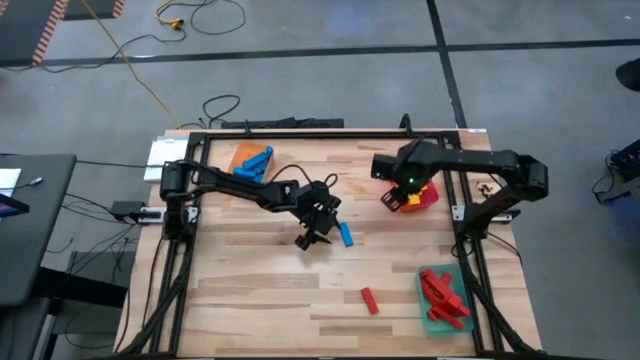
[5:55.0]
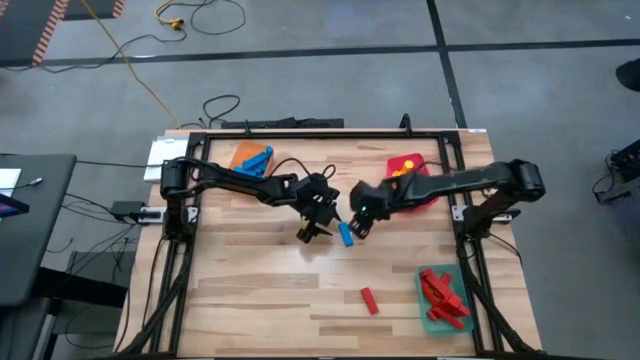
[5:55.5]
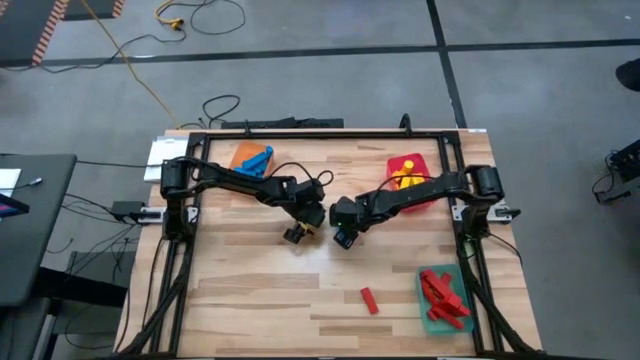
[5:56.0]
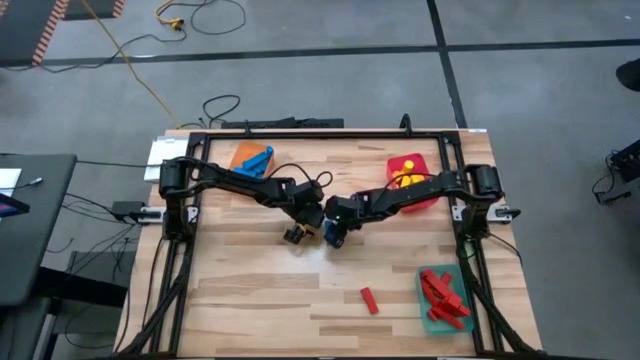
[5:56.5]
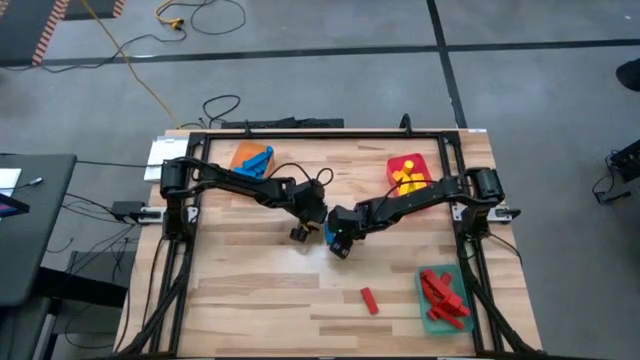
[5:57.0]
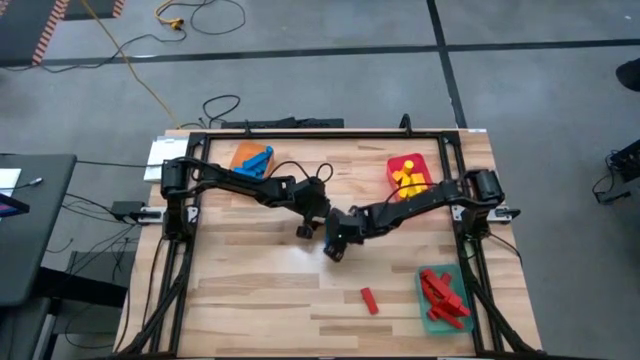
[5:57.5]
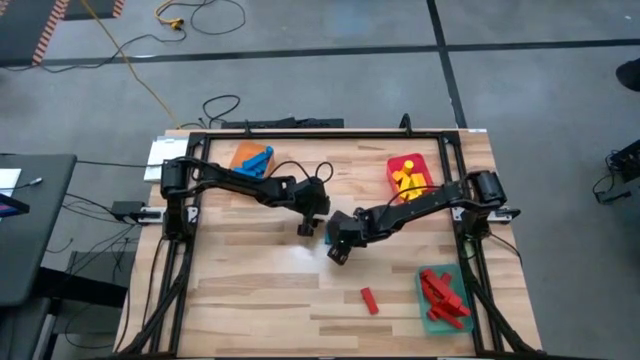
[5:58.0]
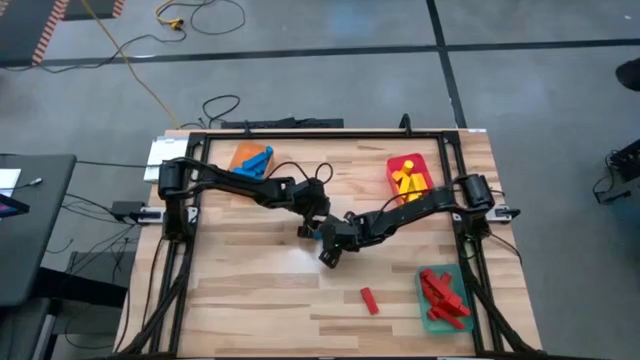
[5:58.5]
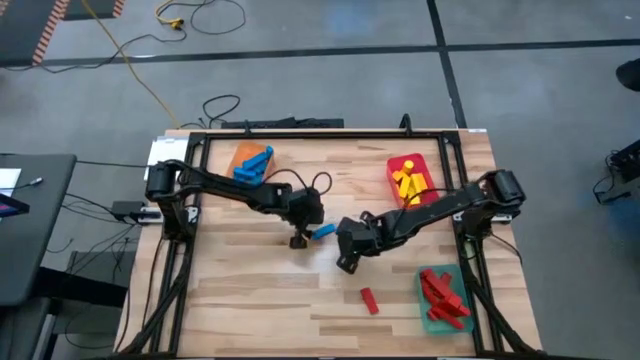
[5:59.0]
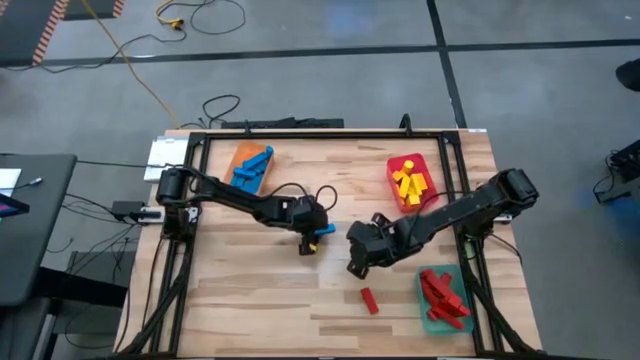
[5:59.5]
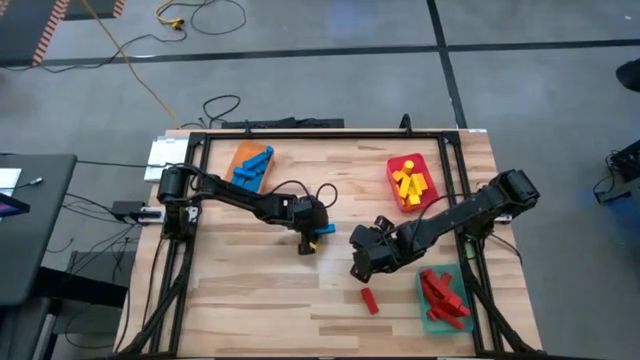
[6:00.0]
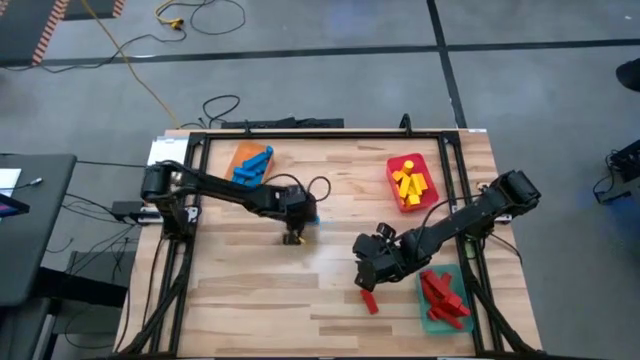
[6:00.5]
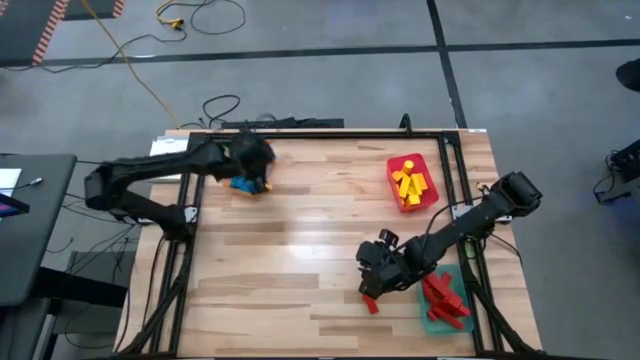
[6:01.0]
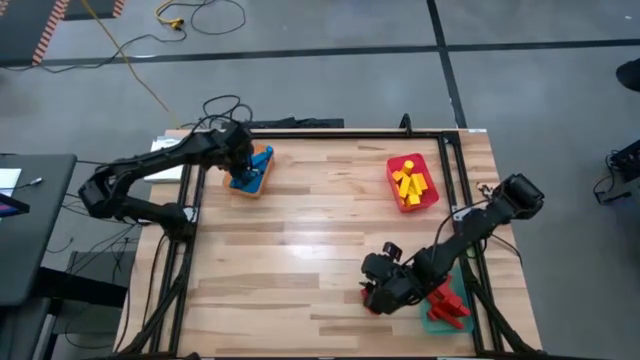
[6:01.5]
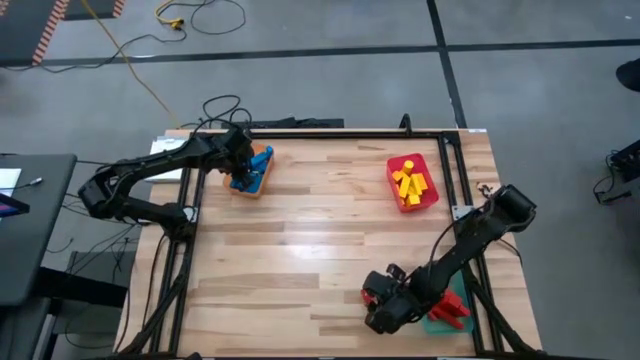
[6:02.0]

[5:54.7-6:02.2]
Task: Sort blocks
Put the blue rectangle block into the orange bin

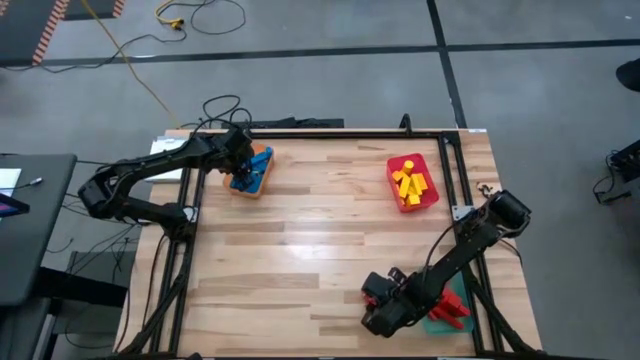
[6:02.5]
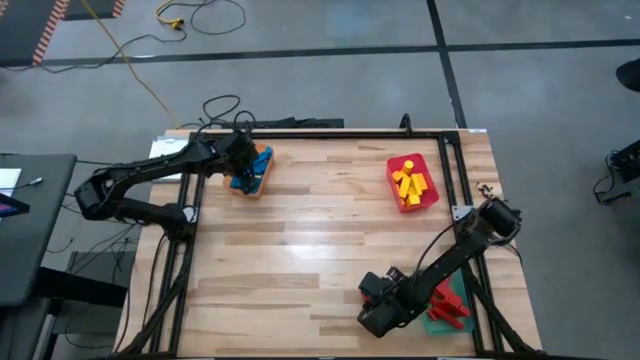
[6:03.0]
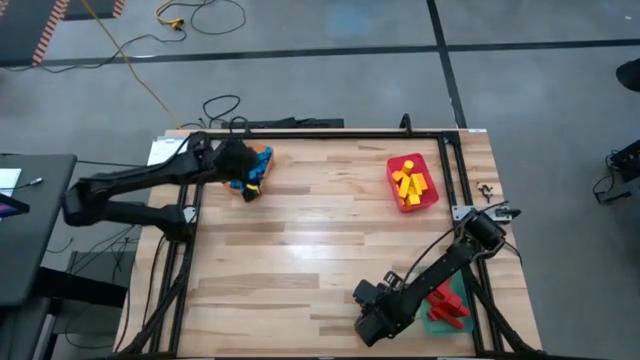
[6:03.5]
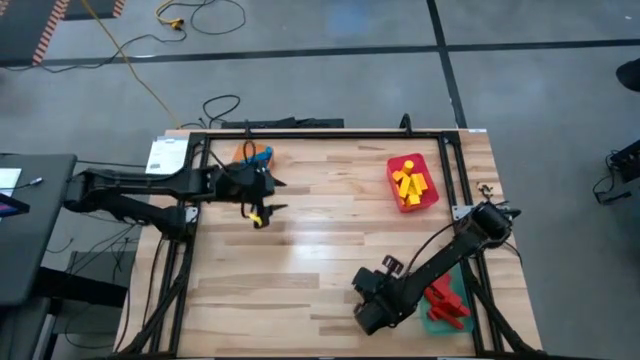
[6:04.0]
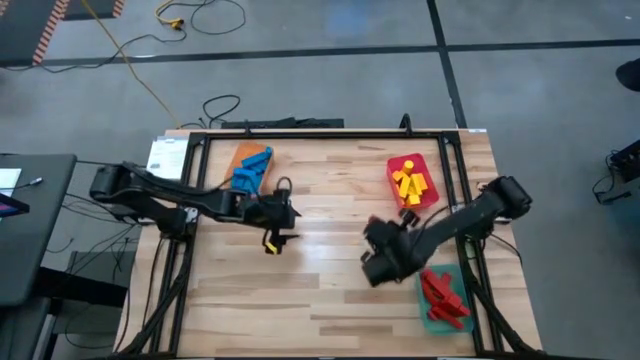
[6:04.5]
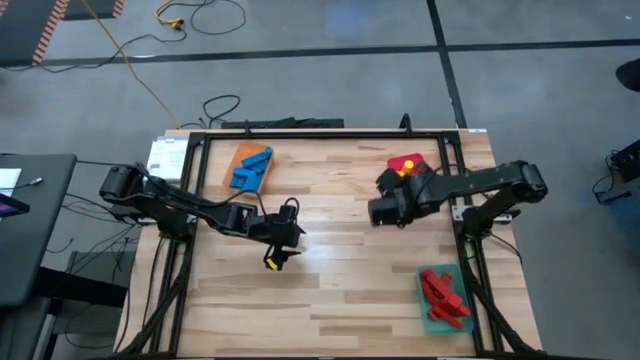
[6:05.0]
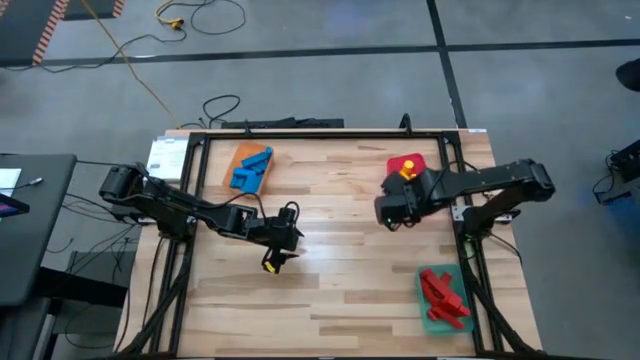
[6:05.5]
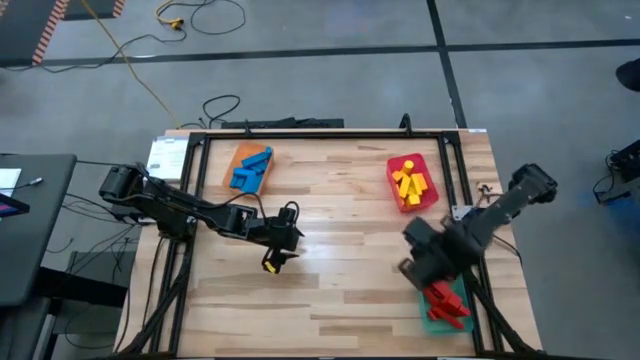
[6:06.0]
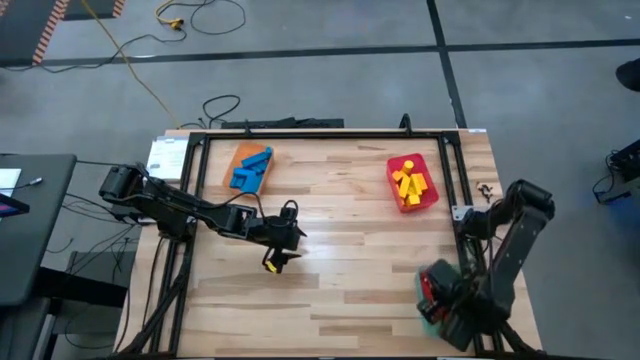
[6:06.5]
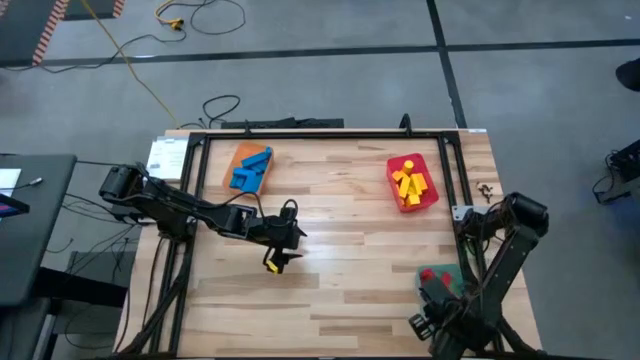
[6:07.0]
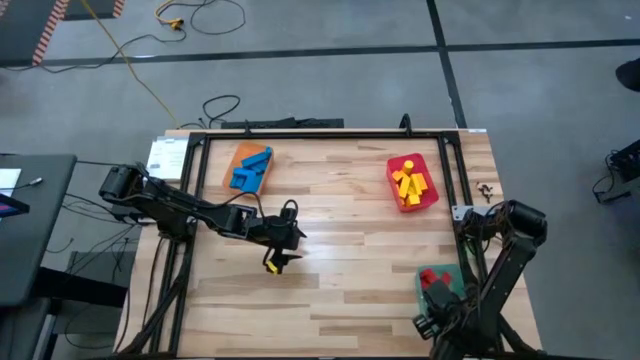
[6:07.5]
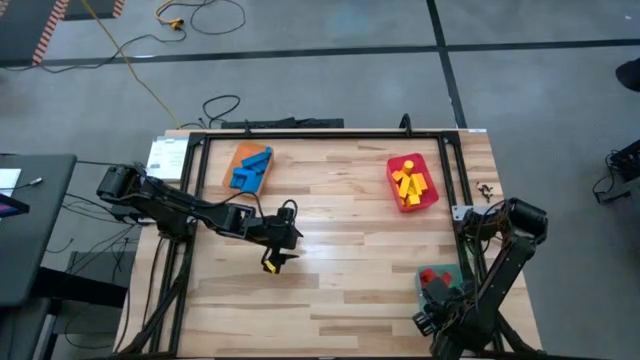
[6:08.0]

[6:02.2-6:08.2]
Put the red rectangle block into the green bin

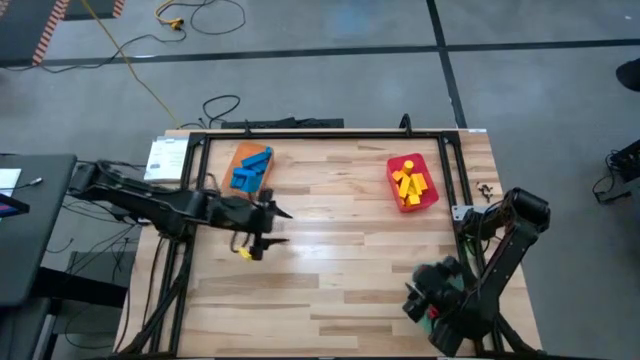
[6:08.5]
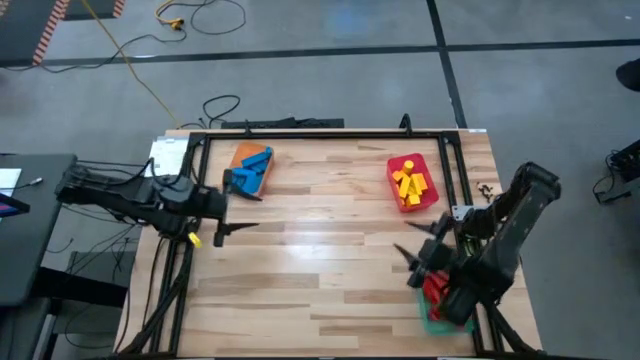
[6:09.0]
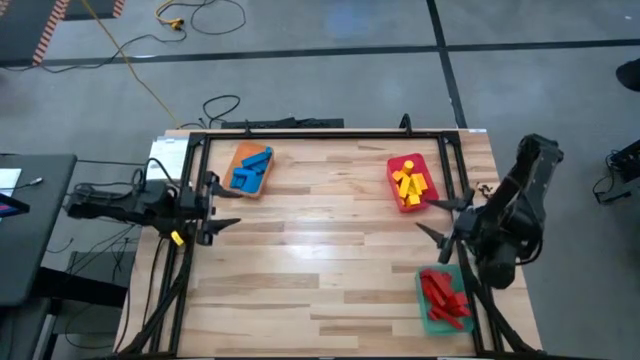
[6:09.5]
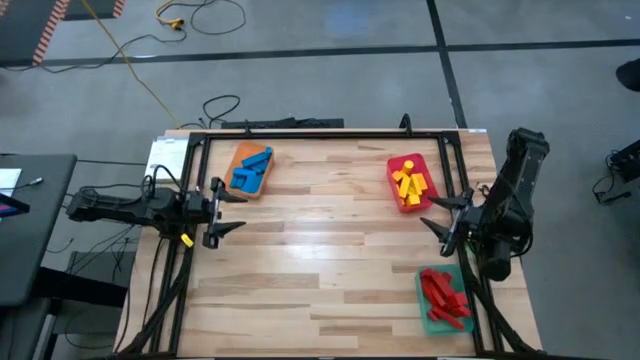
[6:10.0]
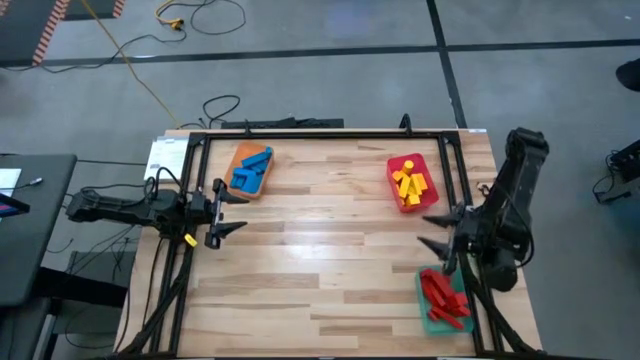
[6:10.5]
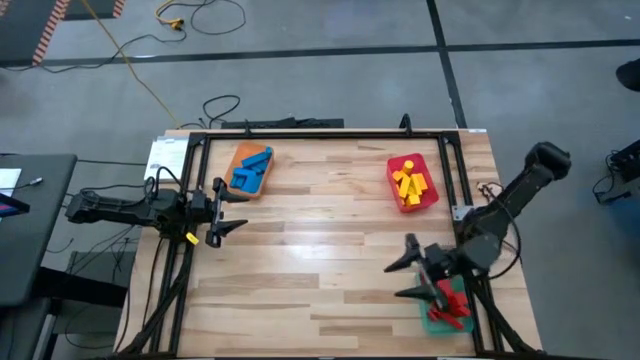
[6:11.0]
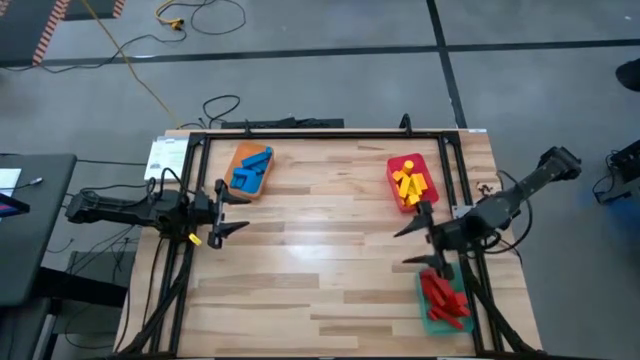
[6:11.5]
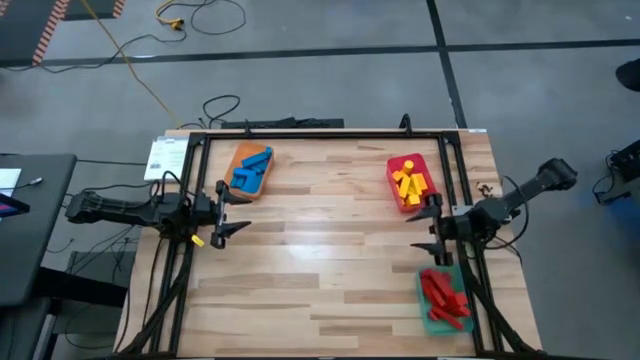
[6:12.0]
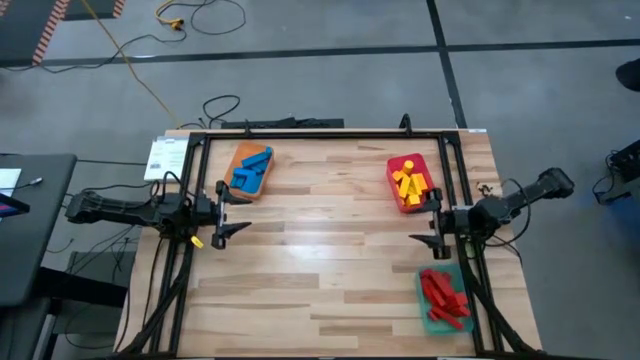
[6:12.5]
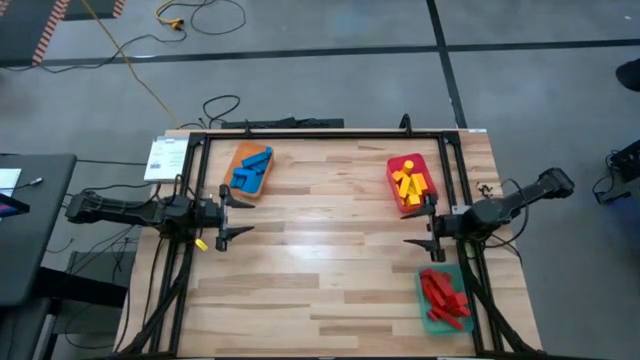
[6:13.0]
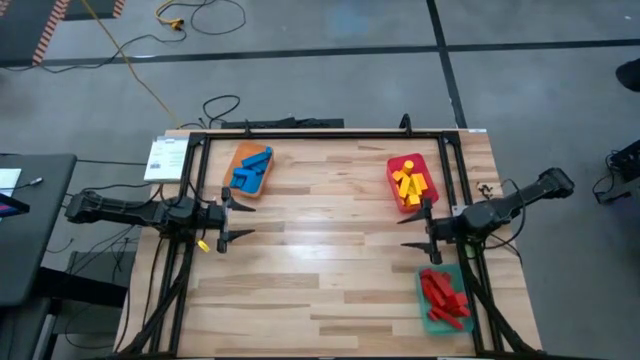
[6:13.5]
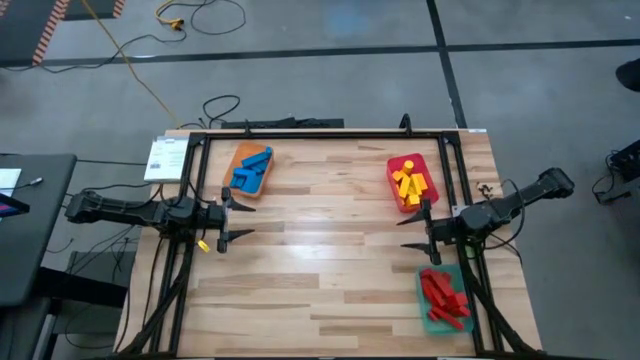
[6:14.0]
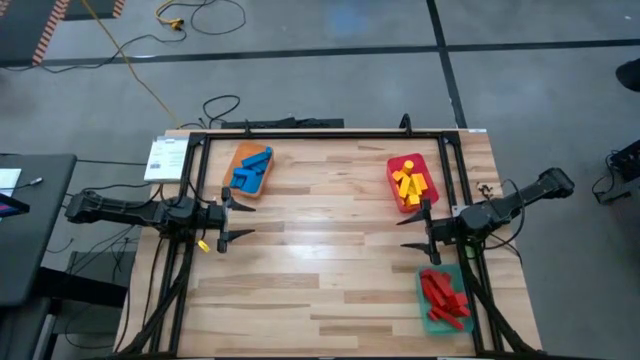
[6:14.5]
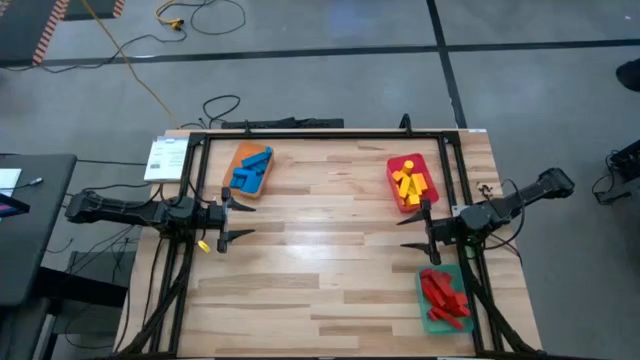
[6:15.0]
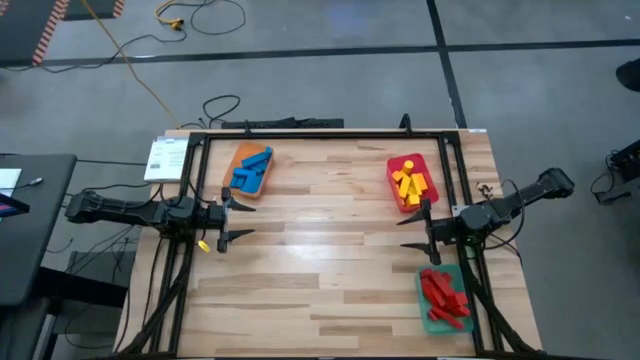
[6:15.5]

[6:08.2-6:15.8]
Return to Home Position
